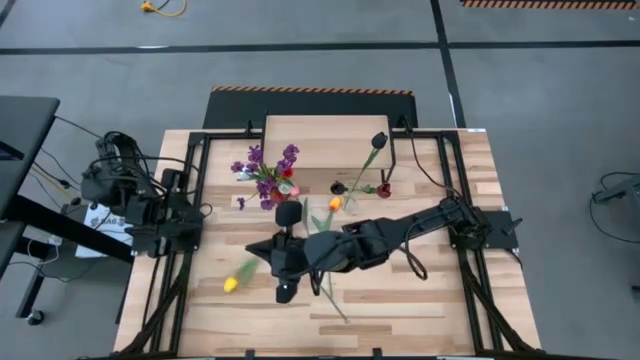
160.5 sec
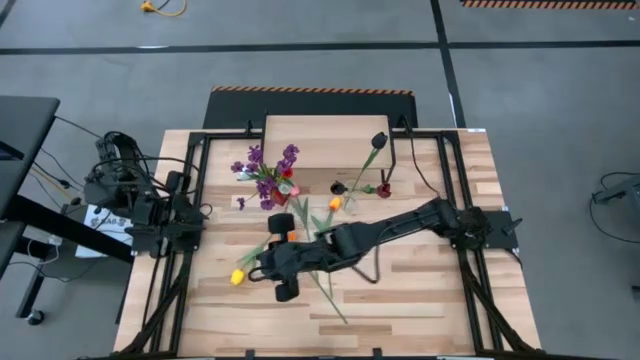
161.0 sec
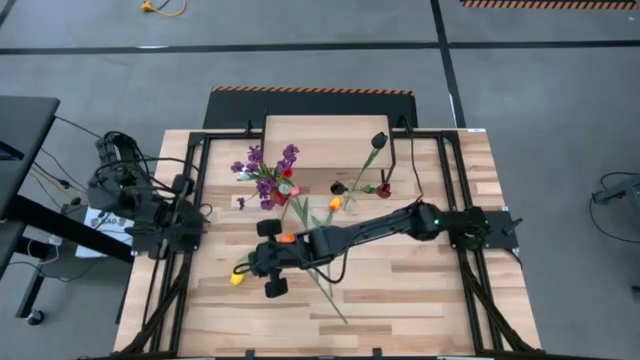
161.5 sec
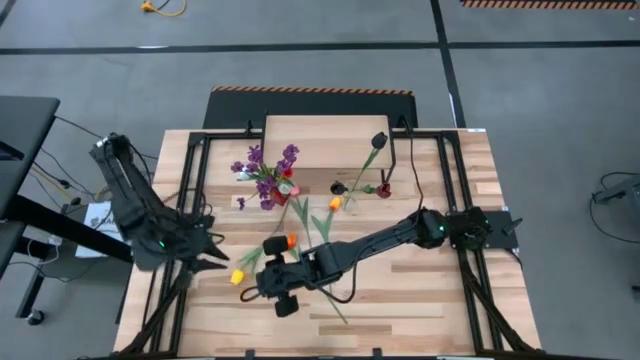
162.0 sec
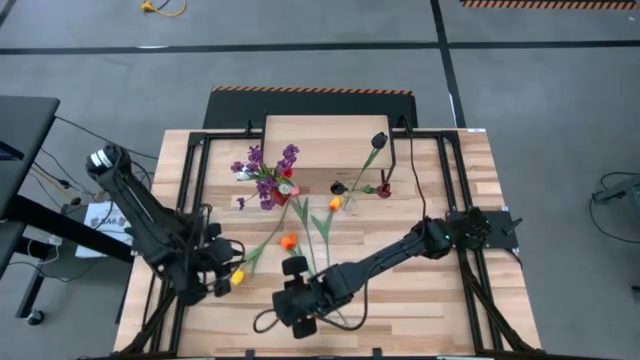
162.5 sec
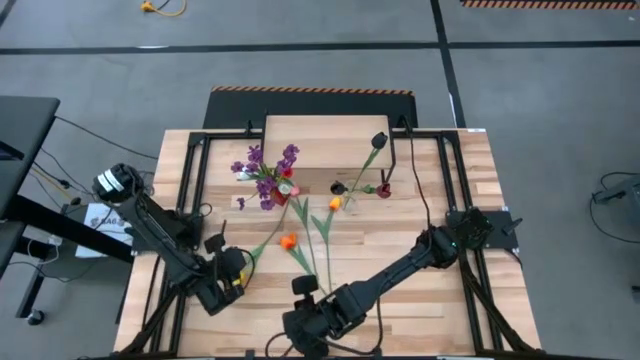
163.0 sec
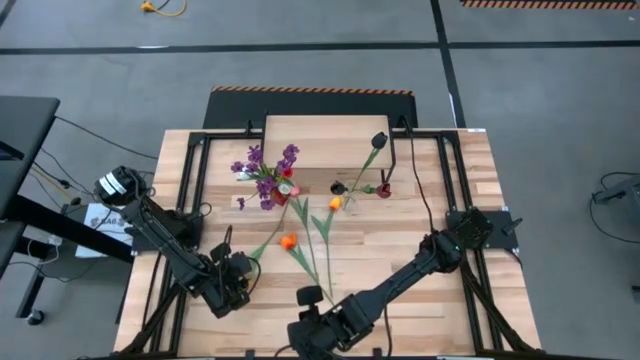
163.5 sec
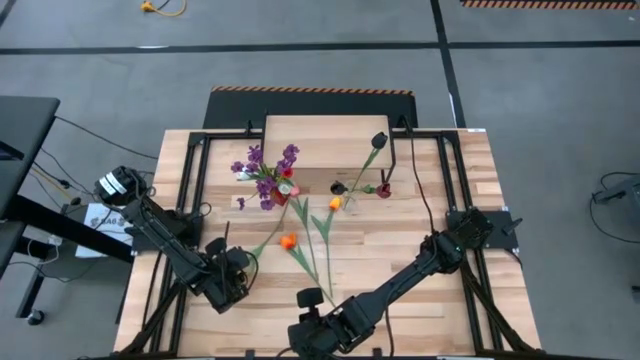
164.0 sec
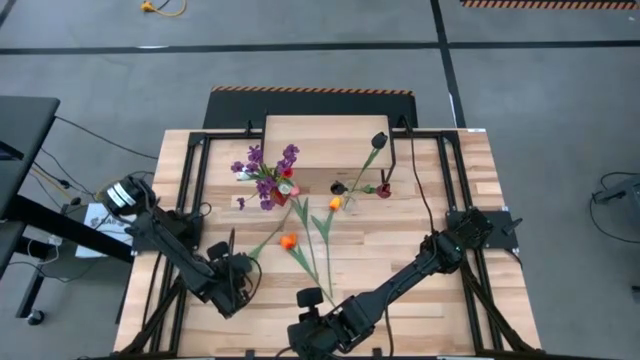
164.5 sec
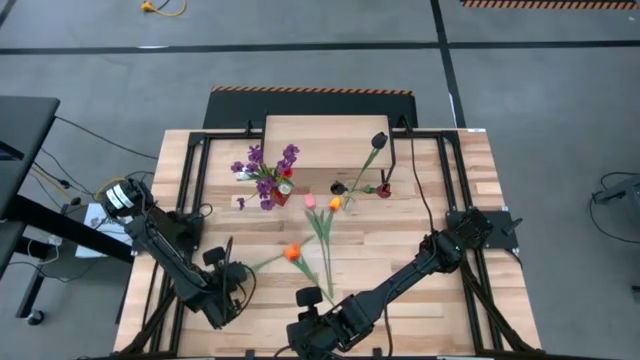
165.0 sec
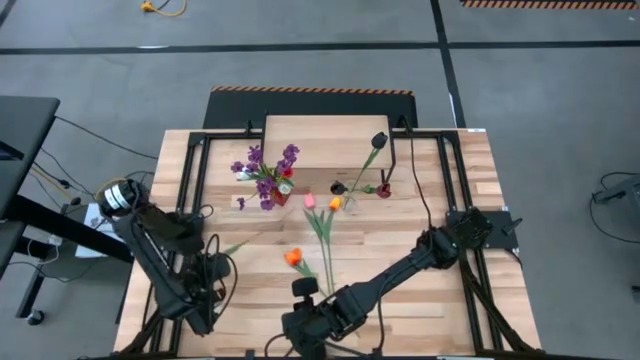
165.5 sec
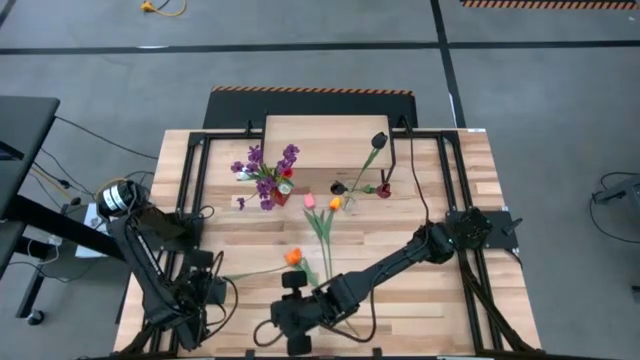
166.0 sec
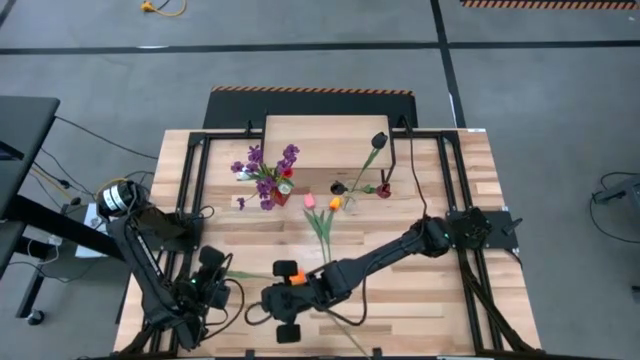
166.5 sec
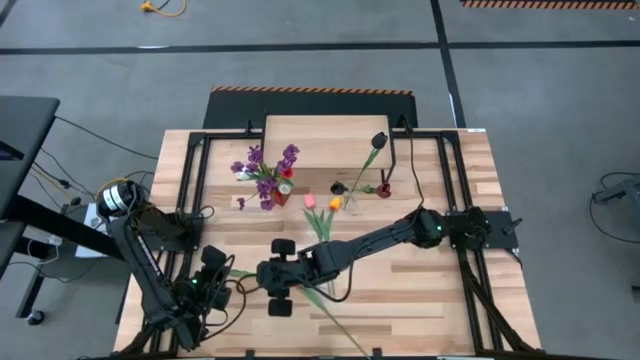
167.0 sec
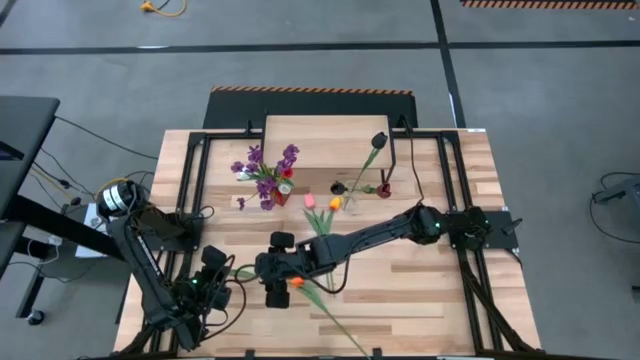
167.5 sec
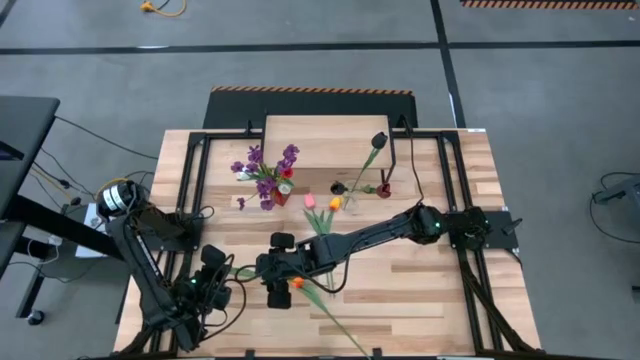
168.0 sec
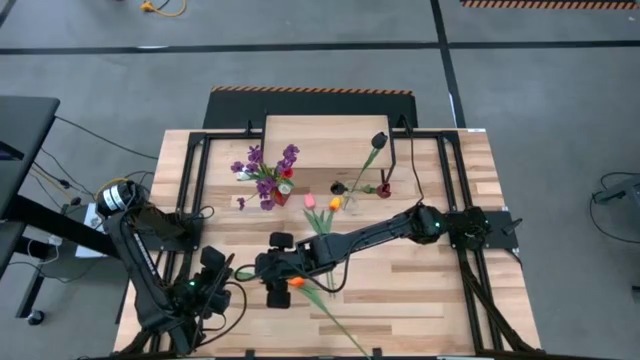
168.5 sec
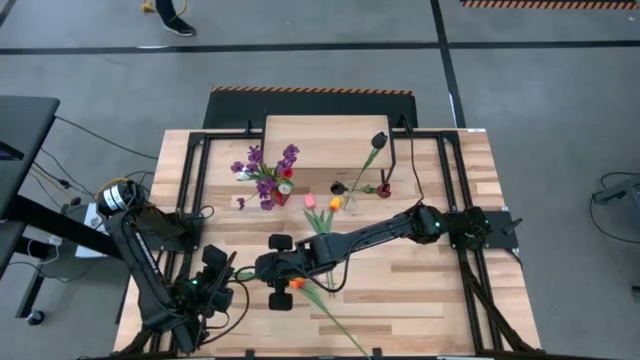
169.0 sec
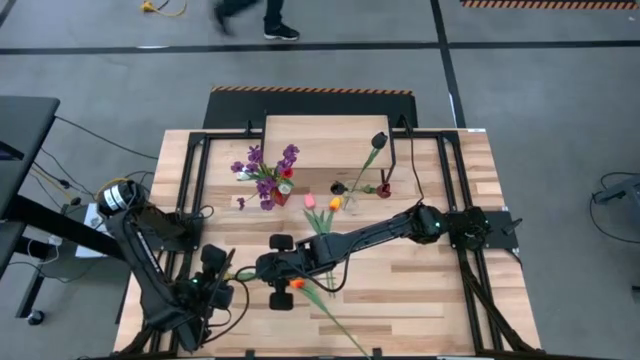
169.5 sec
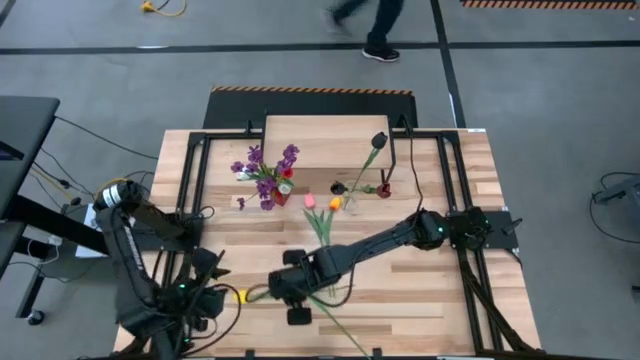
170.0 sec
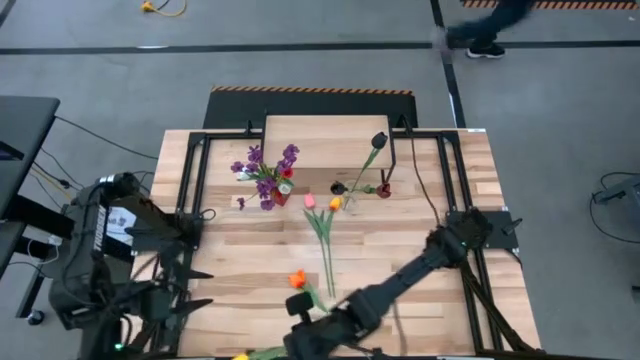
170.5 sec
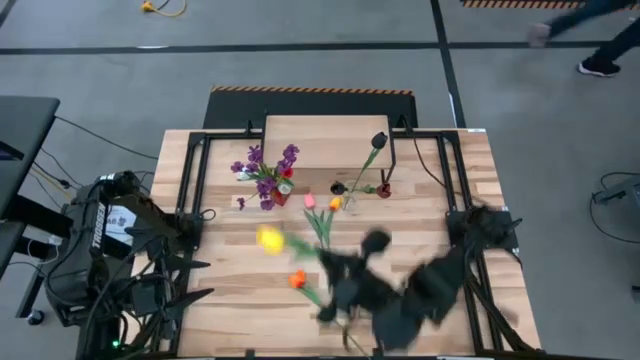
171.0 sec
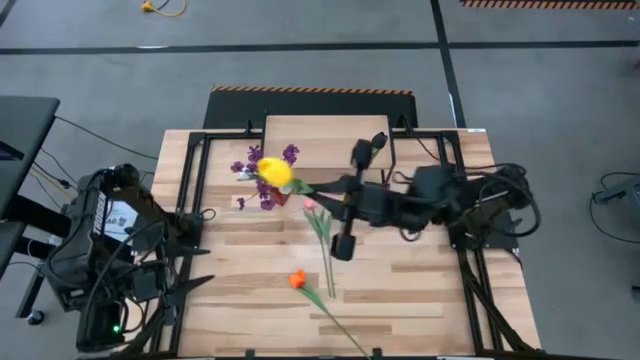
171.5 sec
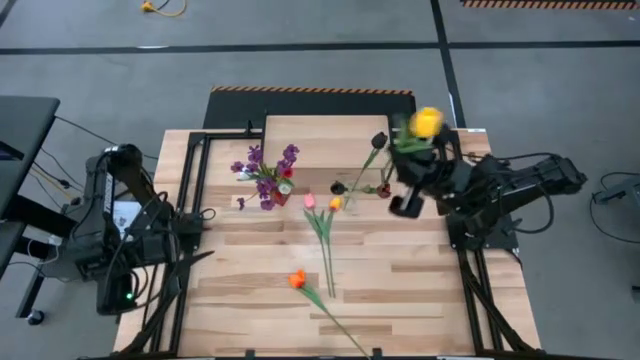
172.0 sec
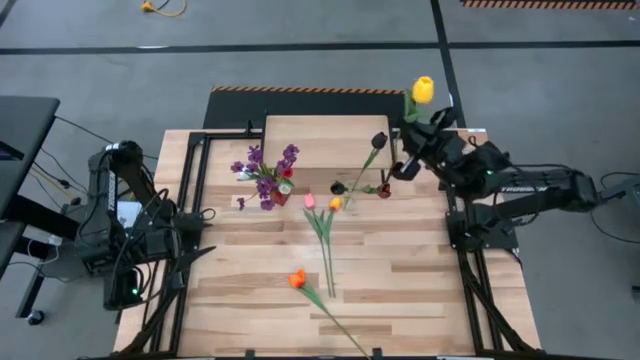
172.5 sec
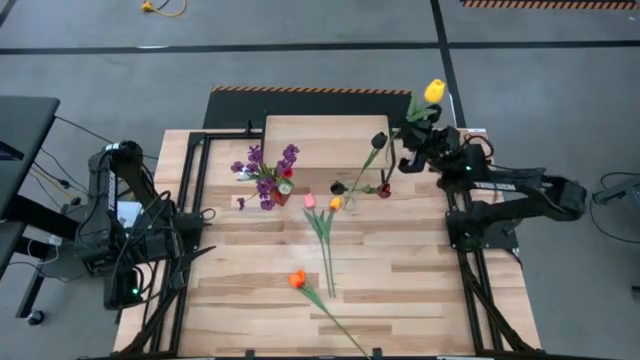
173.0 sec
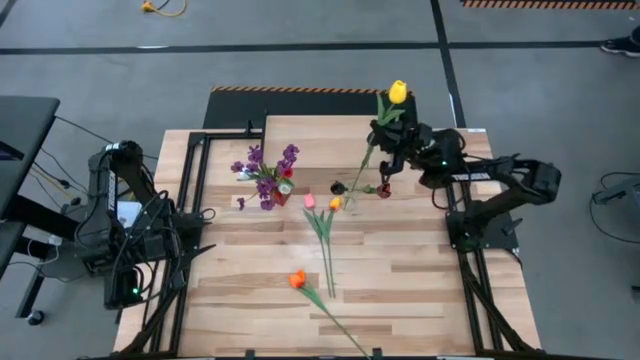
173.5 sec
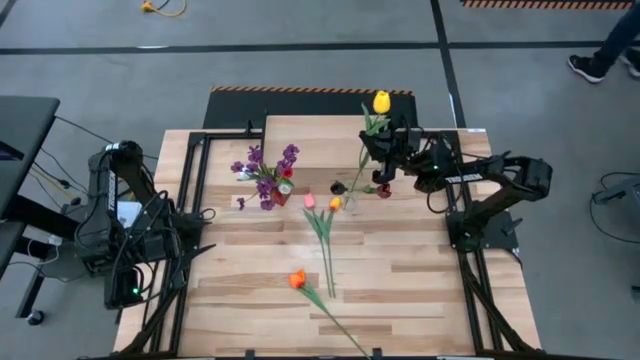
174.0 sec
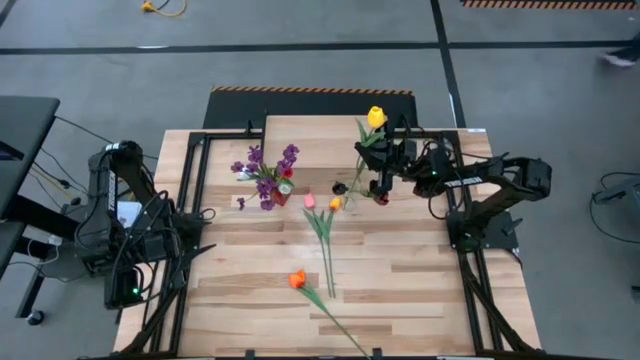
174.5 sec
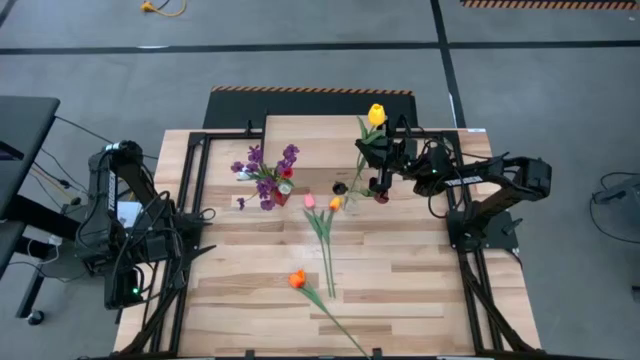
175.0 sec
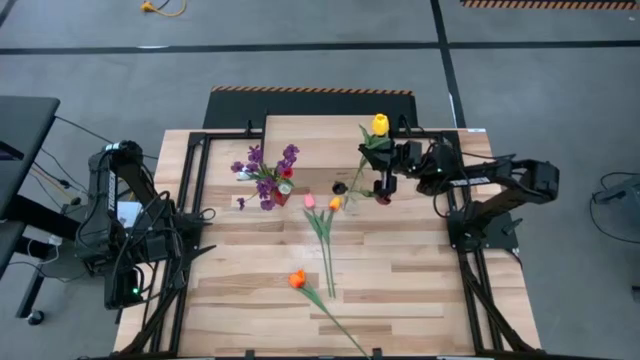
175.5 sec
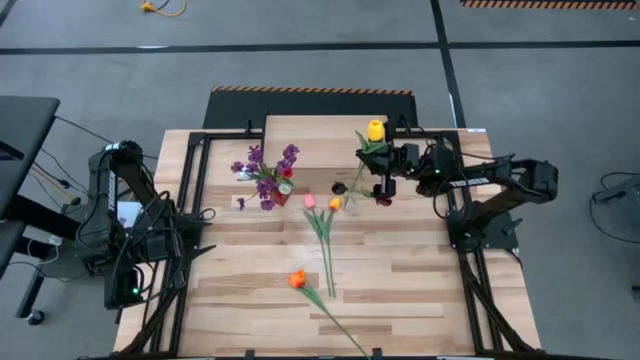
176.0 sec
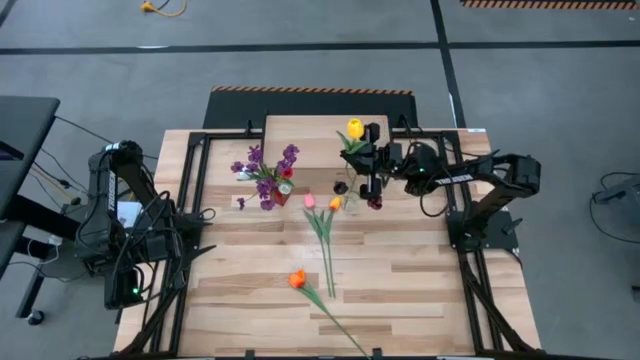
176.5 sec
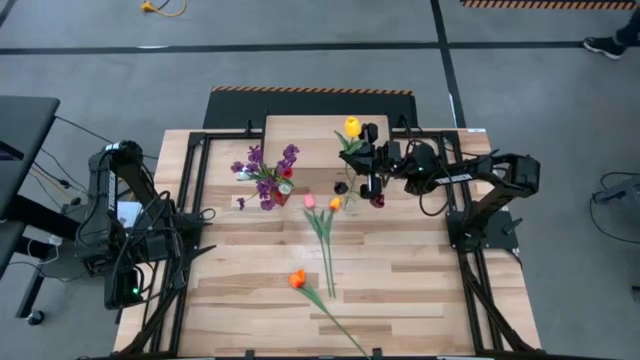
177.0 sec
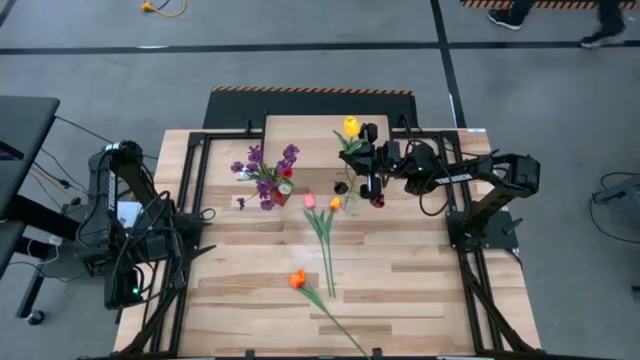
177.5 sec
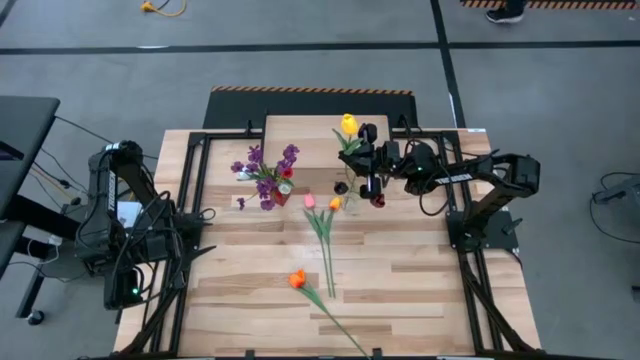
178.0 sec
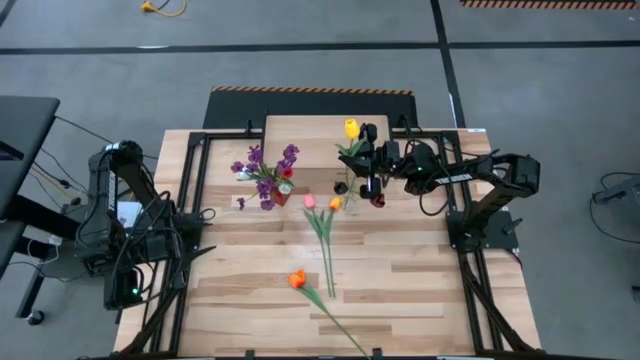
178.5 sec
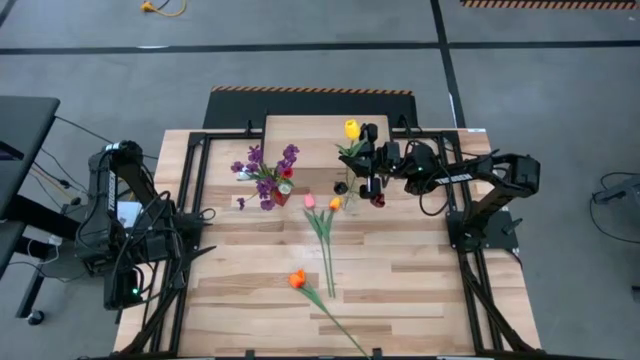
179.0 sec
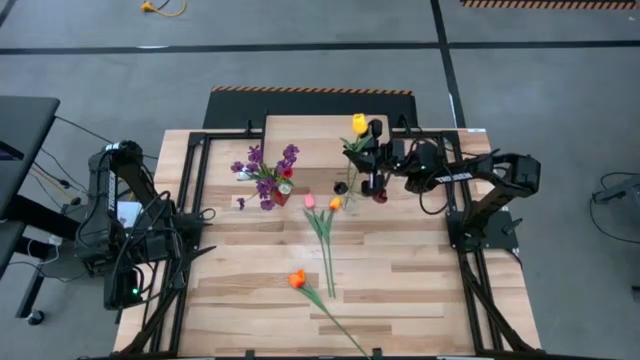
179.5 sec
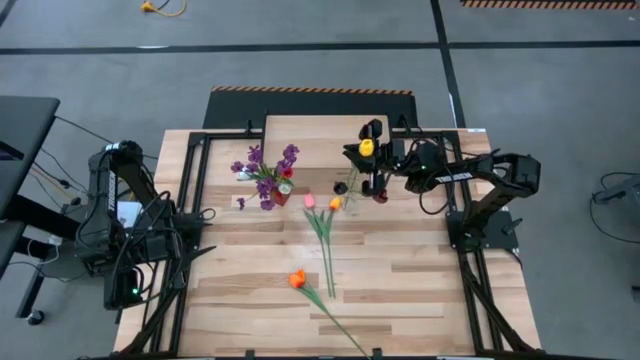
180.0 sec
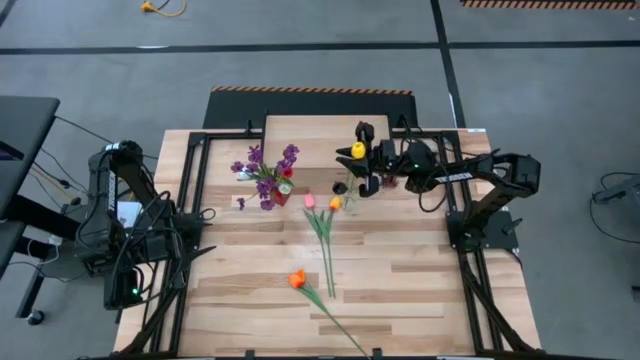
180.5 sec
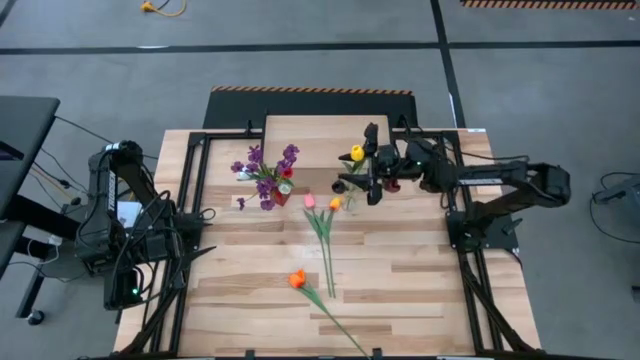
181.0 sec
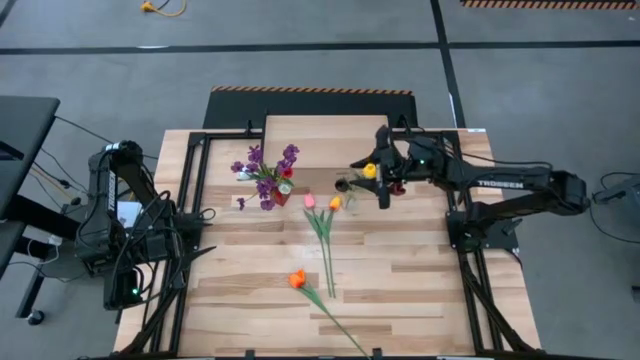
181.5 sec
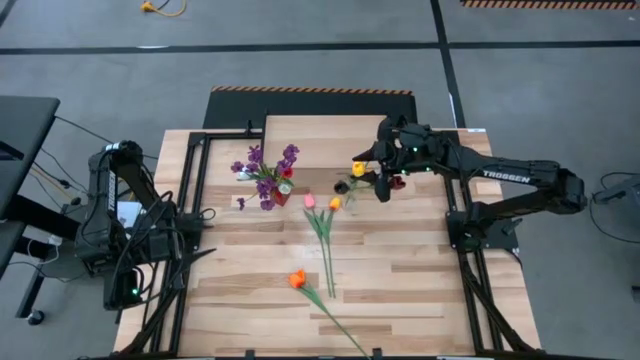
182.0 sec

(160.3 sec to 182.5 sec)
Task: Pick and place flowers into a vace then onto a shelf
Put the yellow flower into the transparent flower vase
